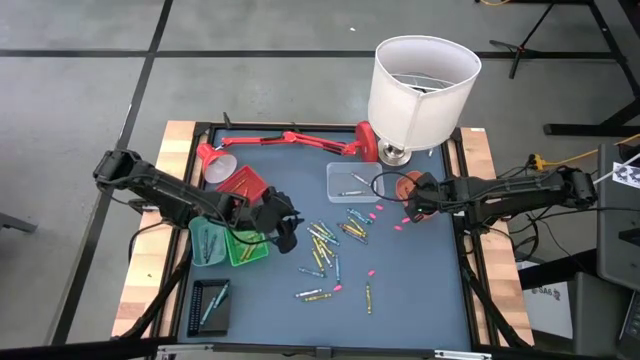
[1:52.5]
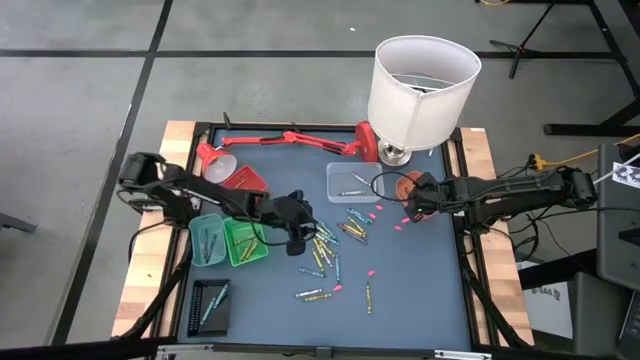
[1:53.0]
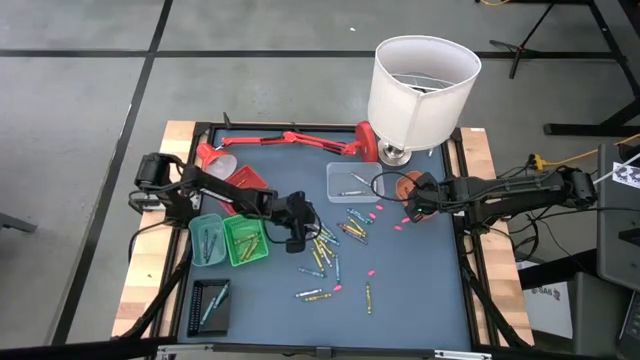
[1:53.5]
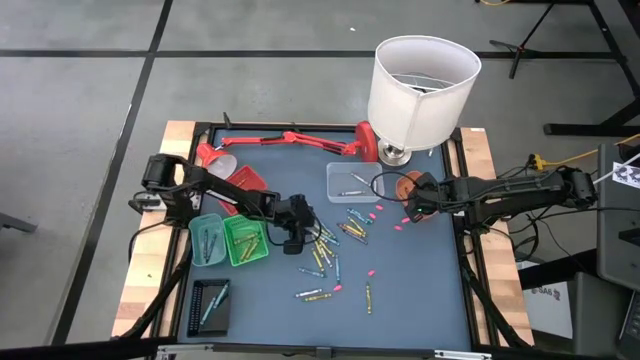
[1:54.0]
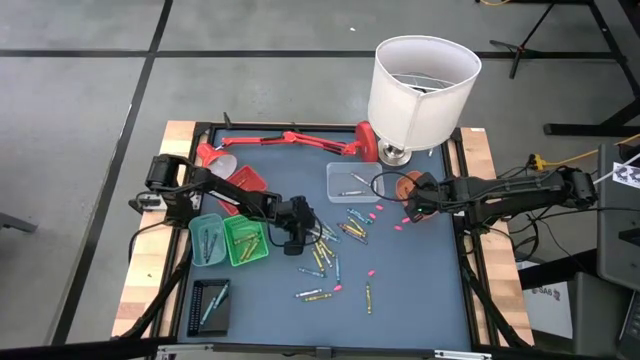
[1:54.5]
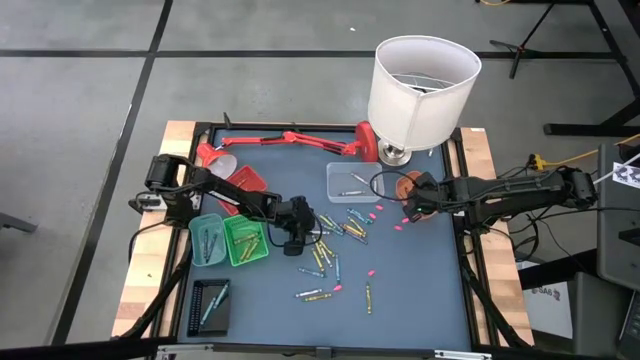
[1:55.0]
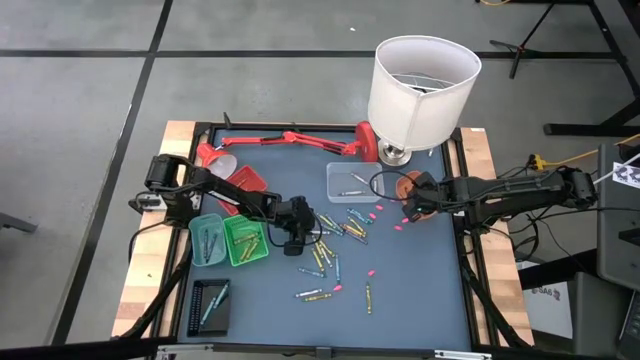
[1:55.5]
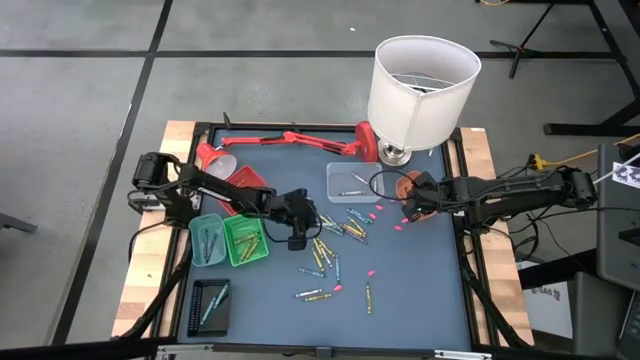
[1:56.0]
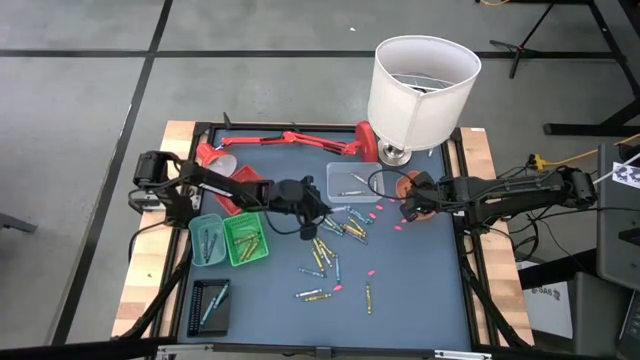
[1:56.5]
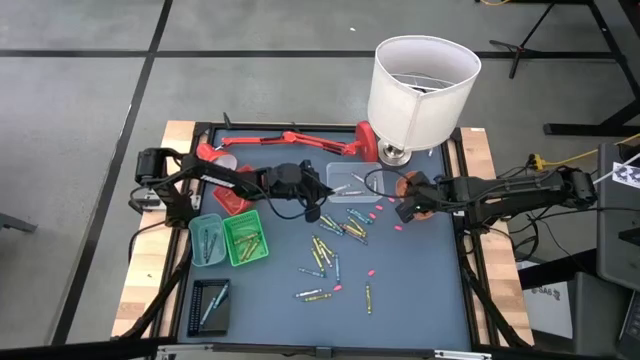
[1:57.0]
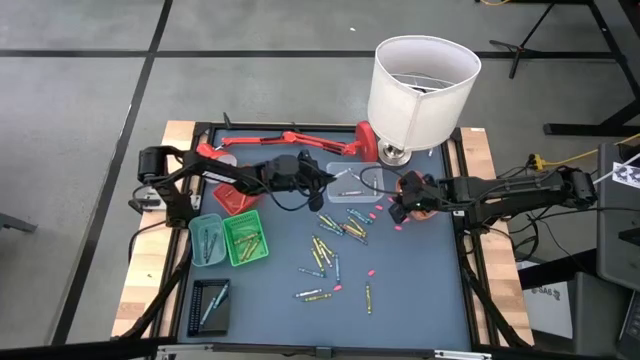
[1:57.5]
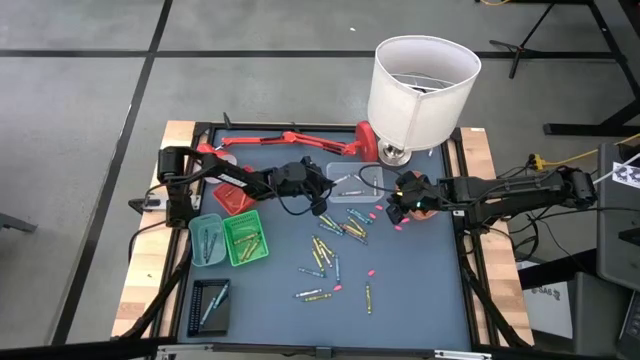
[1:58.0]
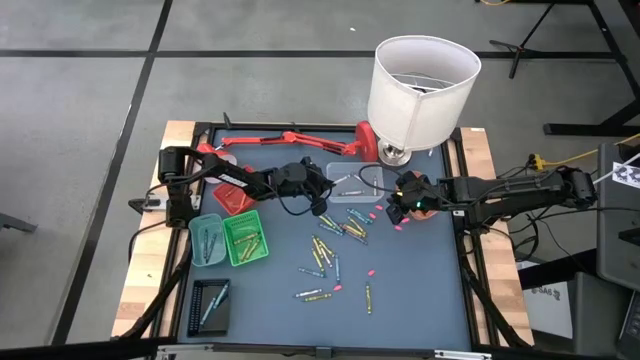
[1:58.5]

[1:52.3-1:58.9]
Task: Sort crayons
Put the gray crayon into the transparent bin

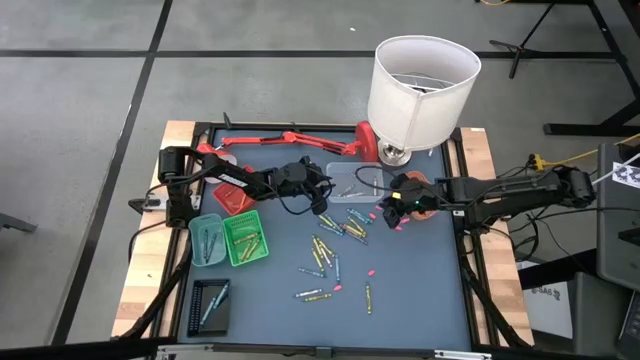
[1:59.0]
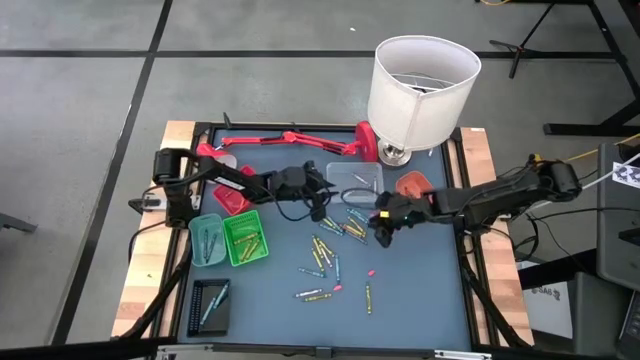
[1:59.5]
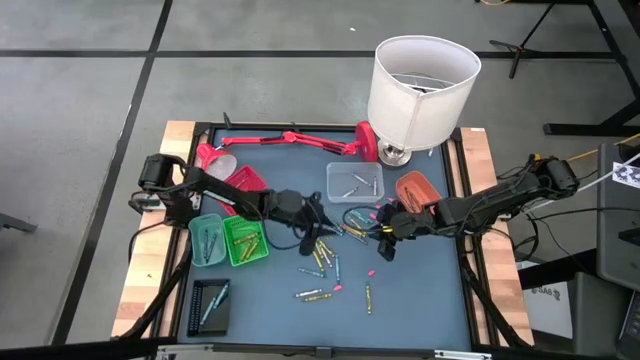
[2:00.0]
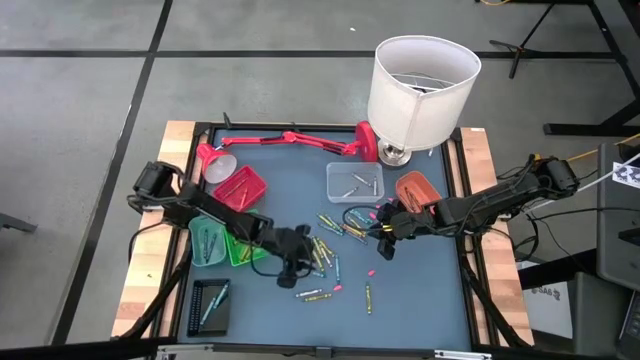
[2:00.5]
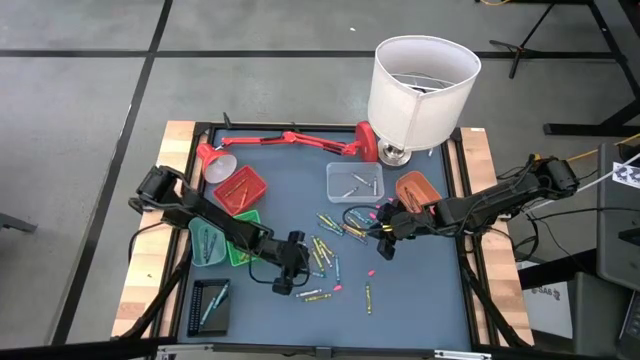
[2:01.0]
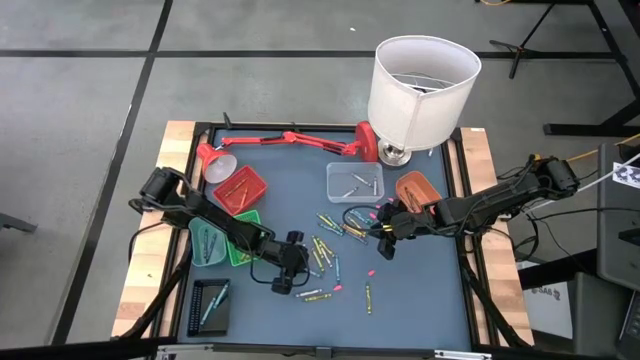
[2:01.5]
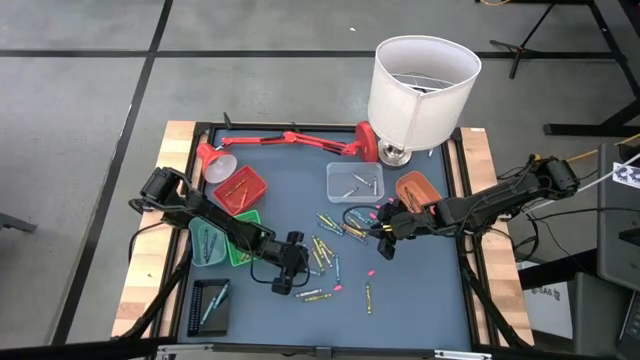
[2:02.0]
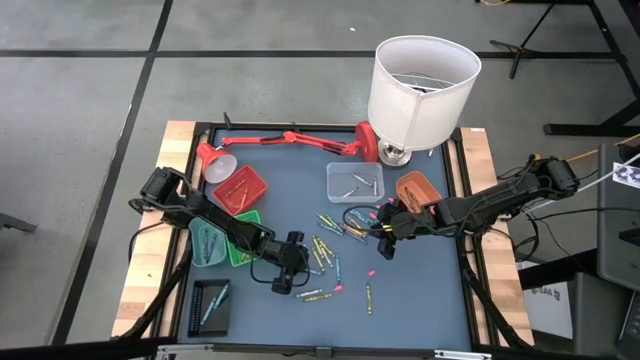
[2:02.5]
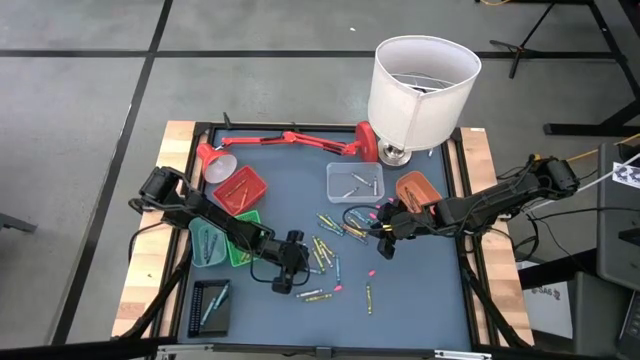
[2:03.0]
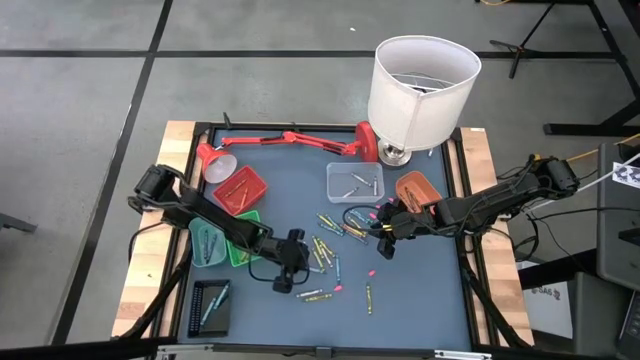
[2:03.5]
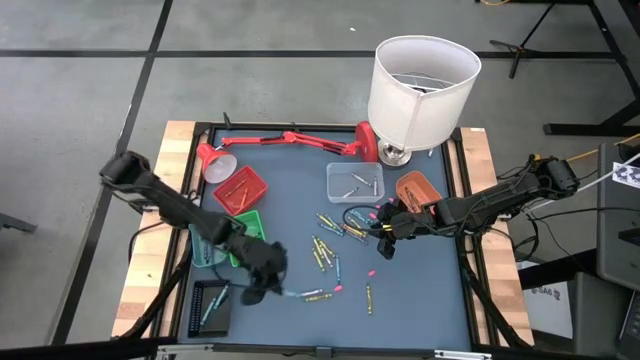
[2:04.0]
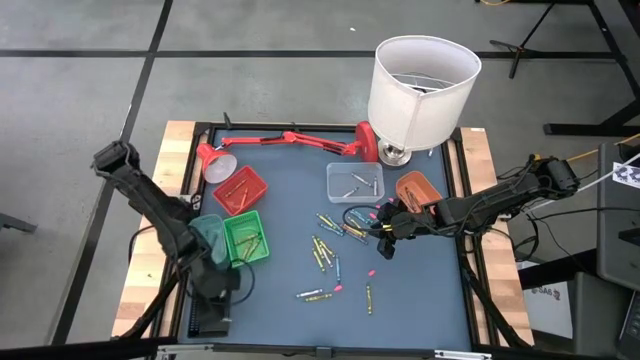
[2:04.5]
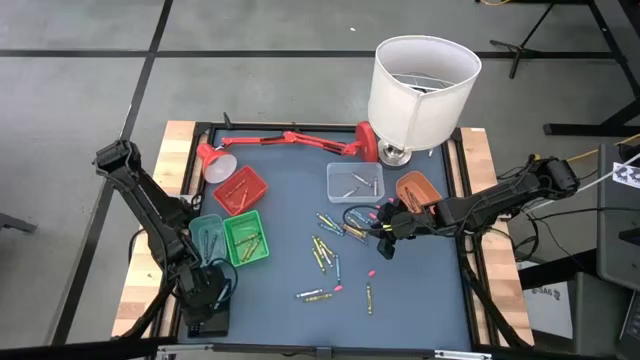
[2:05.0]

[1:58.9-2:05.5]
Put the dark green crayon into the black bin

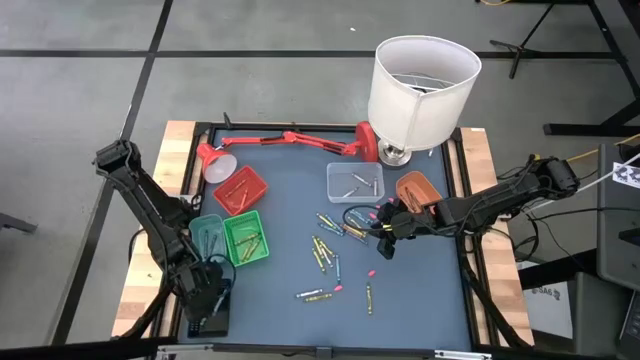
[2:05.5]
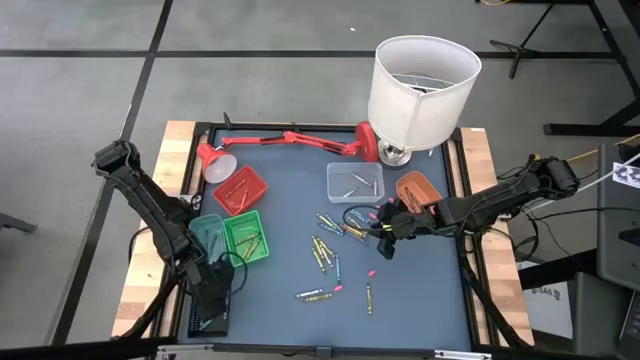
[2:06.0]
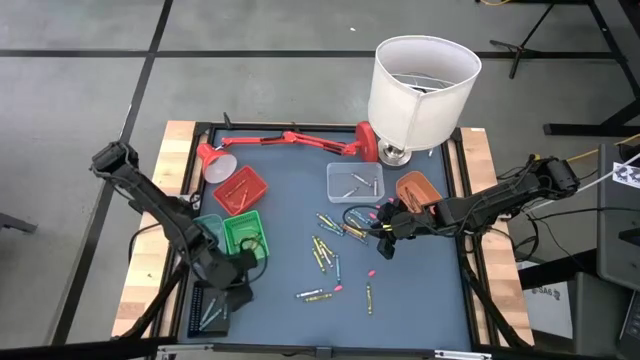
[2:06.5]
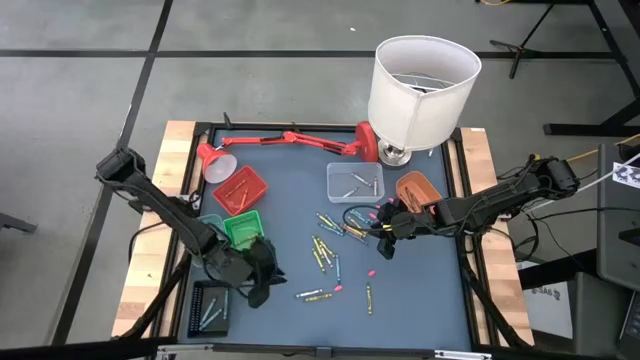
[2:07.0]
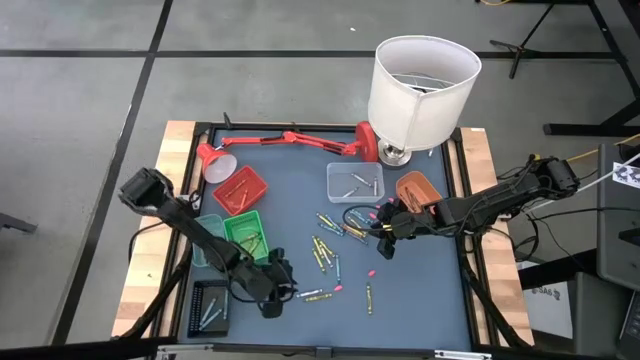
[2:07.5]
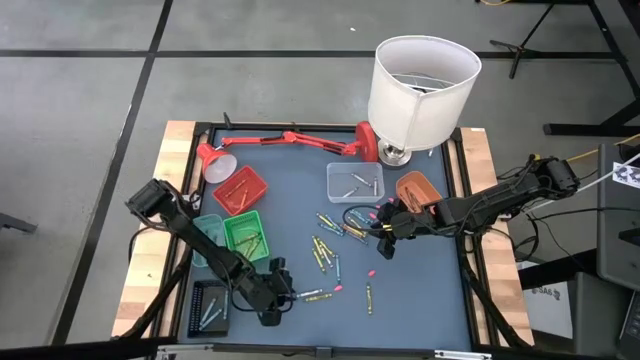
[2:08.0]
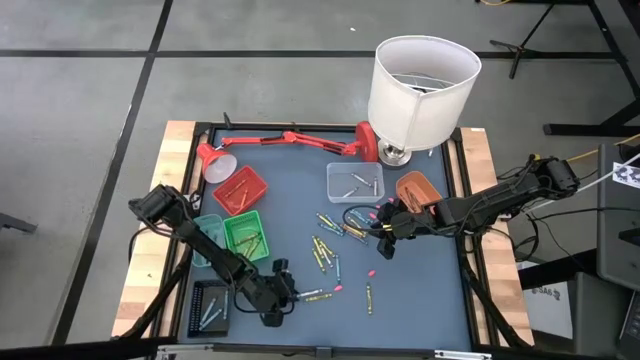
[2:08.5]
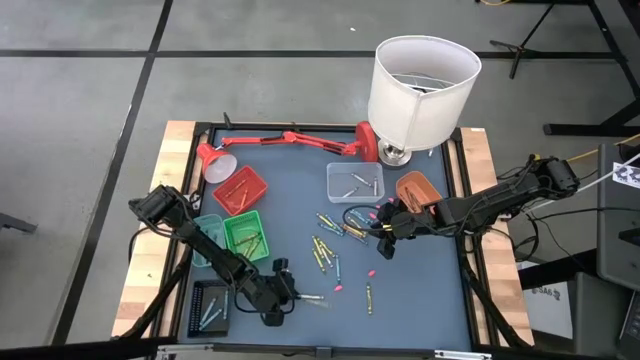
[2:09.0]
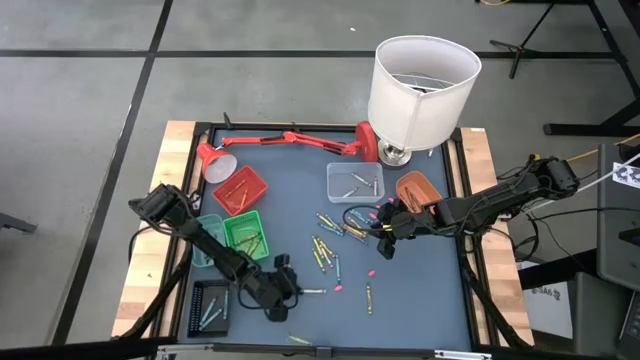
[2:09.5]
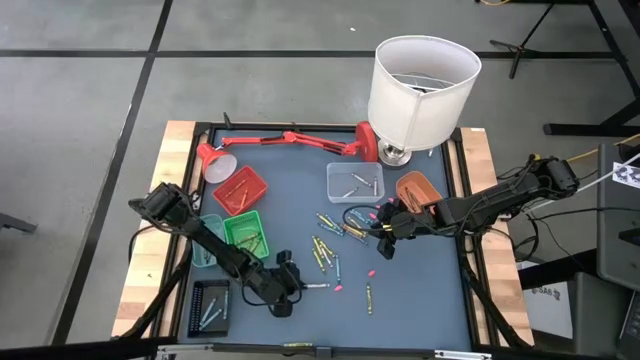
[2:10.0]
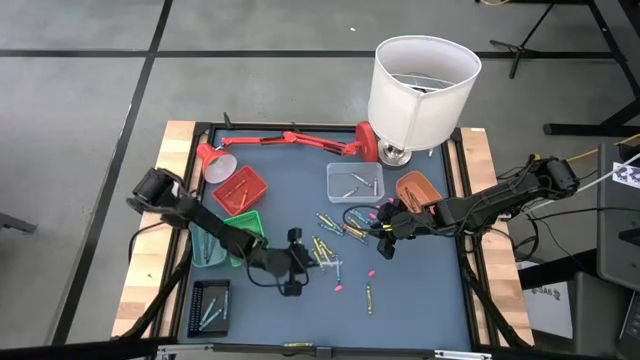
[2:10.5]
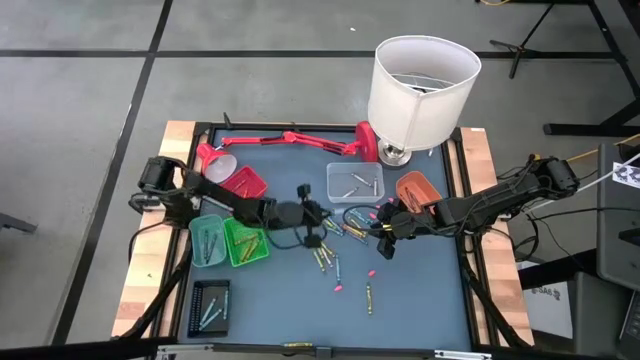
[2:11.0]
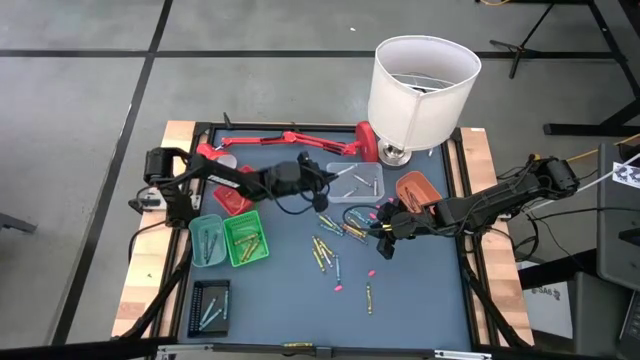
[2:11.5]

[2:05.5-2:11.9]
Put the gray crayon into the transparent bin

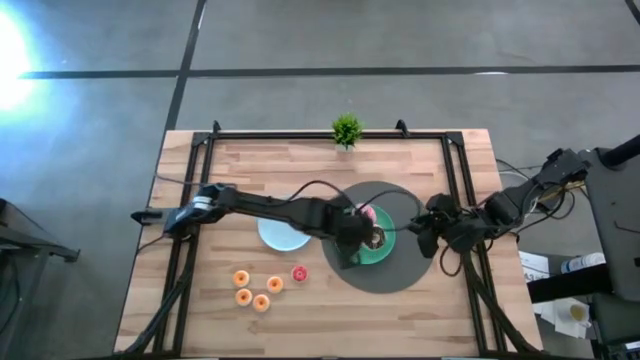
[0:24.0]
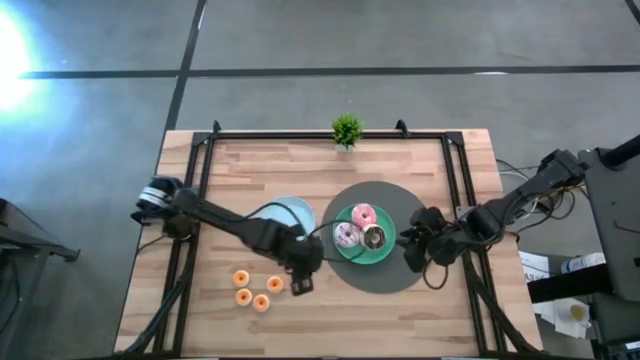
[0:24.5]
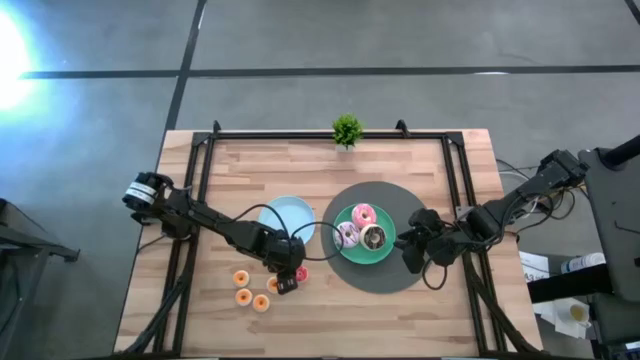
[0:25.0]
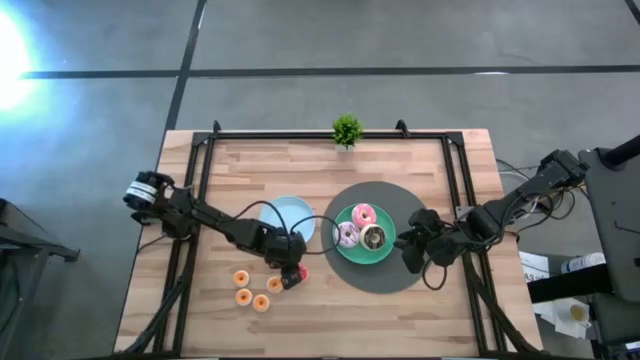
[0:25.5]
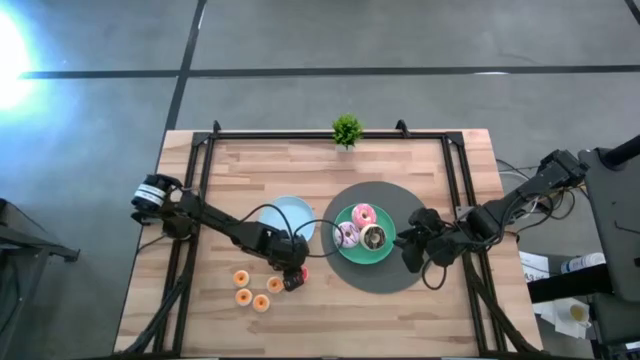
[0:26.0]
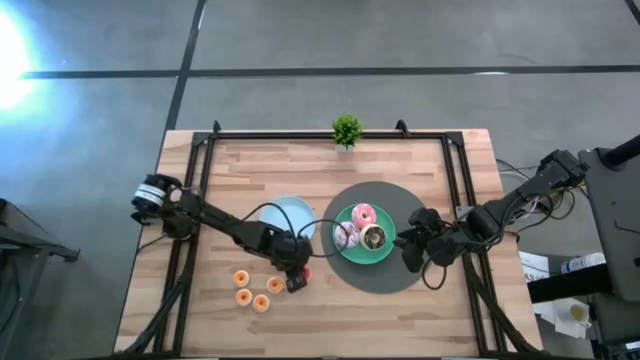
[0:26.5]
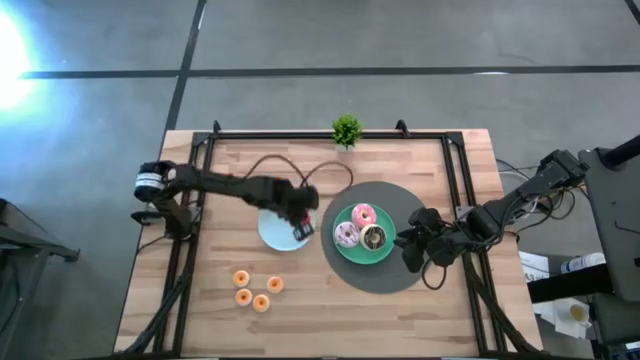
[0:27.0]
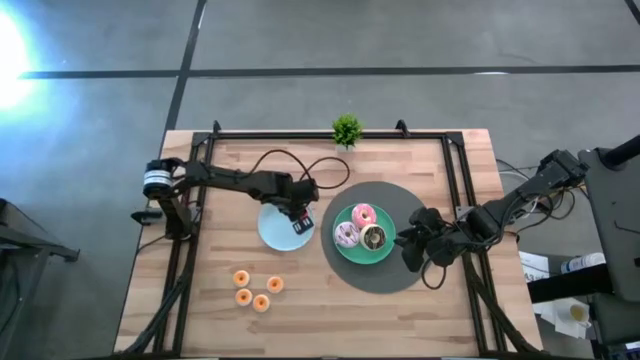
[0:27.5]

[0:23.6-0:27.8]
Task: Pick & Place donuts
Put the small orange donut on the light blue plate
